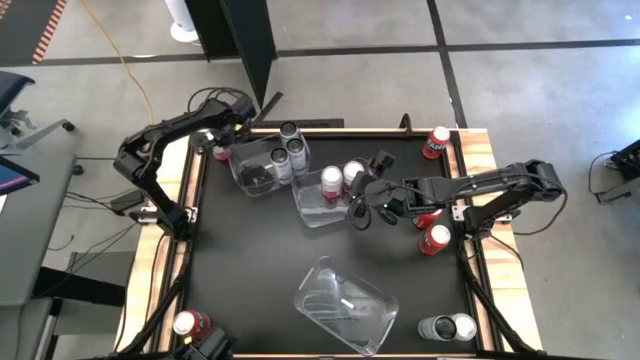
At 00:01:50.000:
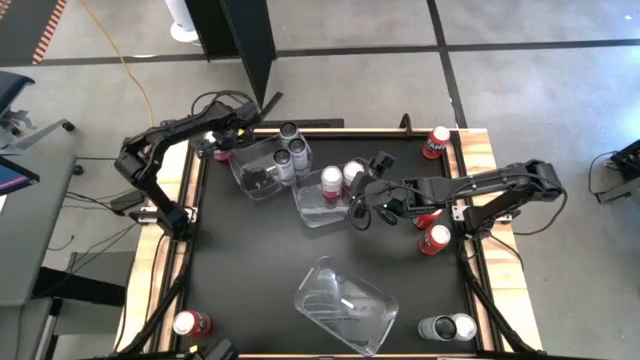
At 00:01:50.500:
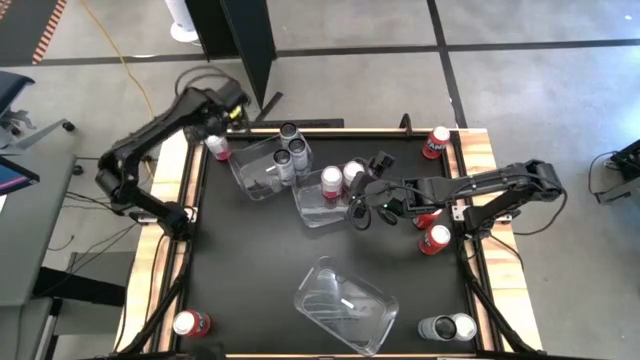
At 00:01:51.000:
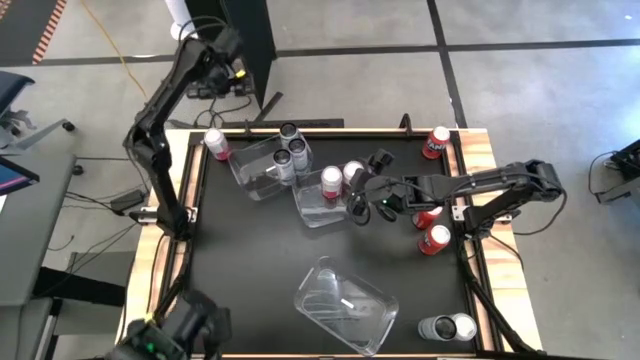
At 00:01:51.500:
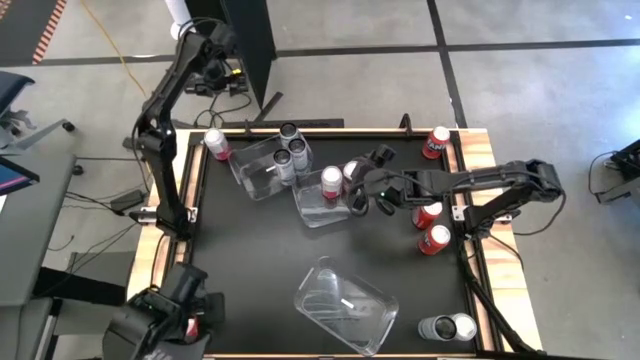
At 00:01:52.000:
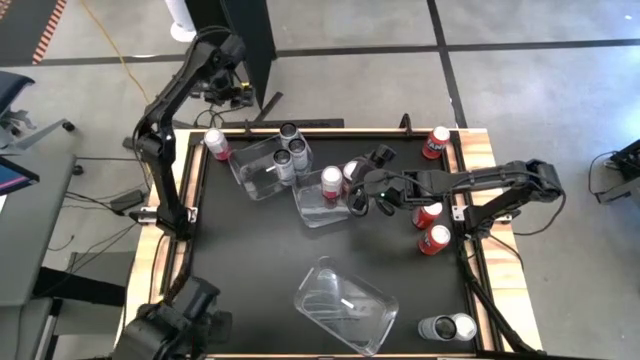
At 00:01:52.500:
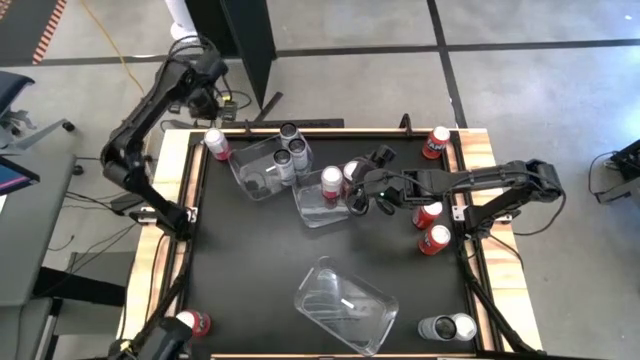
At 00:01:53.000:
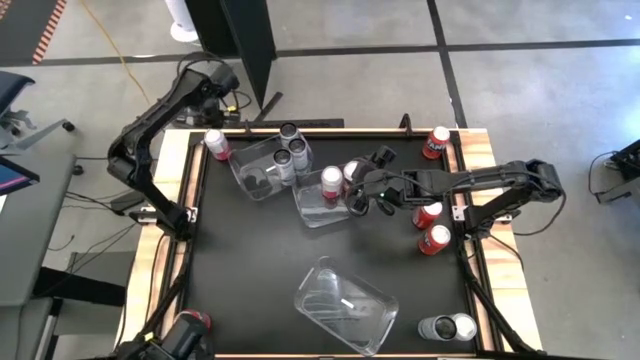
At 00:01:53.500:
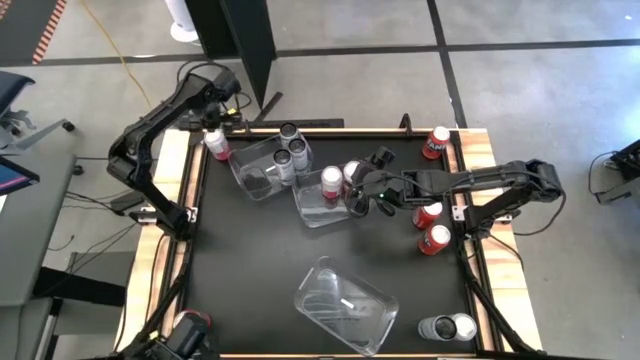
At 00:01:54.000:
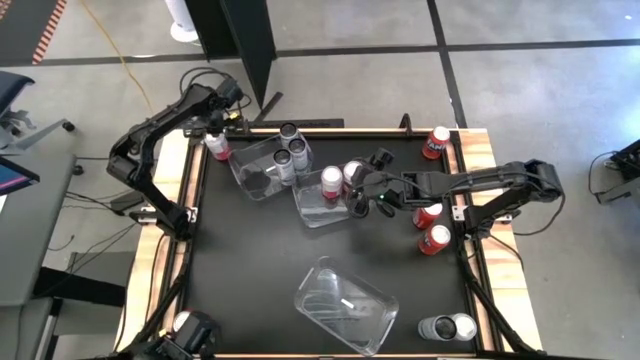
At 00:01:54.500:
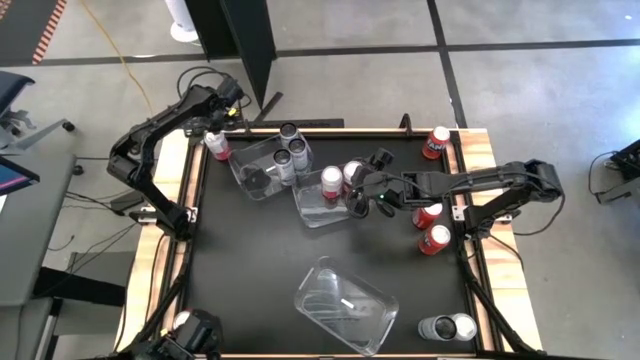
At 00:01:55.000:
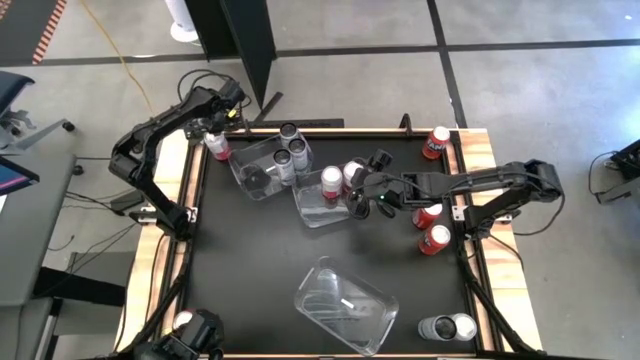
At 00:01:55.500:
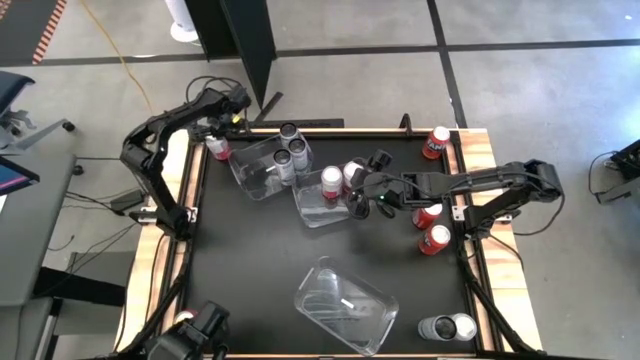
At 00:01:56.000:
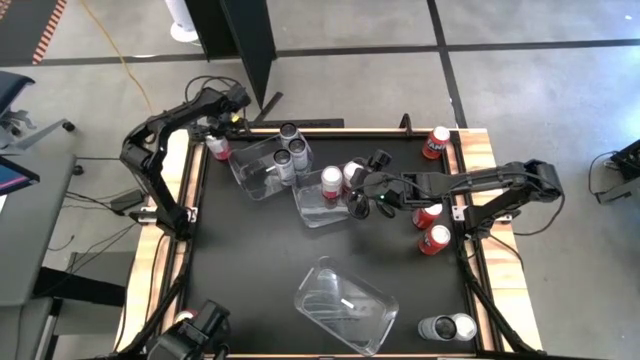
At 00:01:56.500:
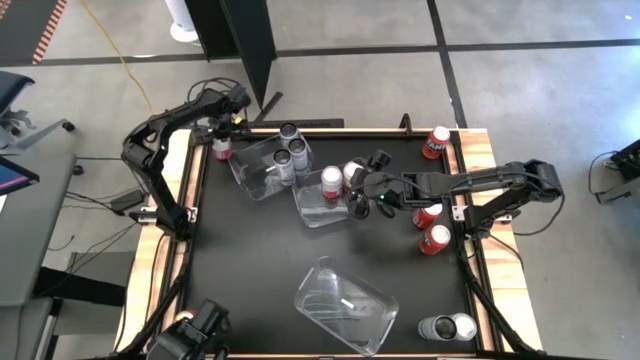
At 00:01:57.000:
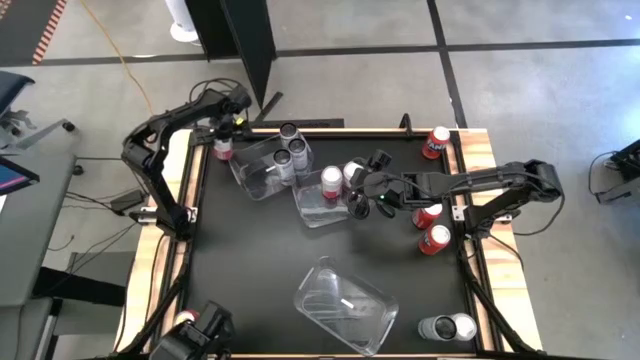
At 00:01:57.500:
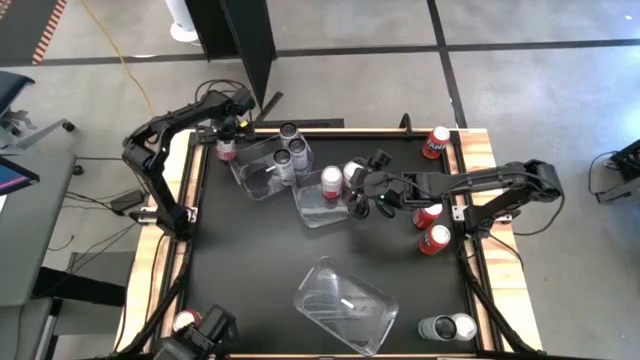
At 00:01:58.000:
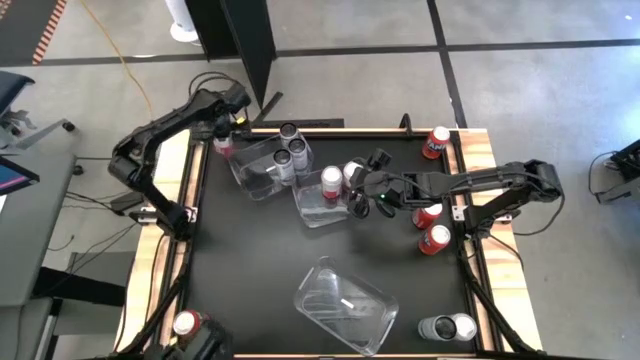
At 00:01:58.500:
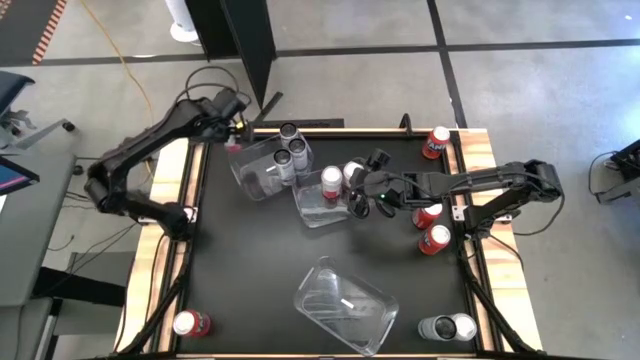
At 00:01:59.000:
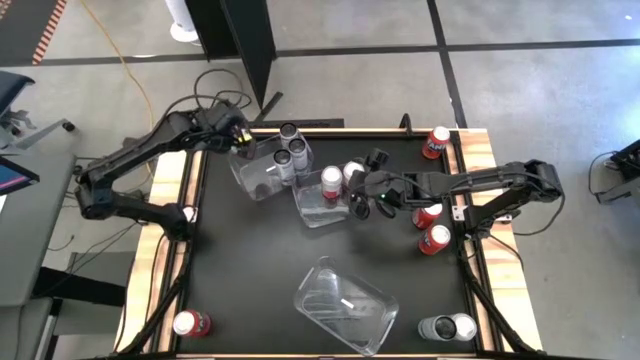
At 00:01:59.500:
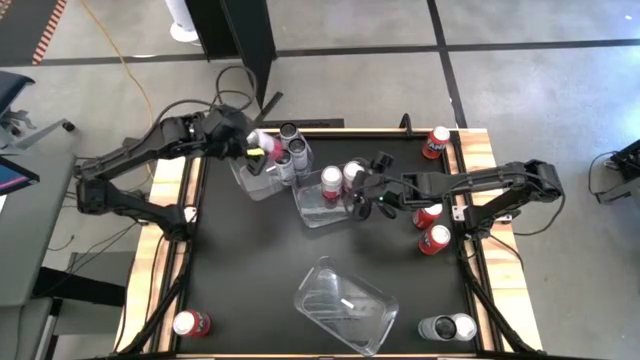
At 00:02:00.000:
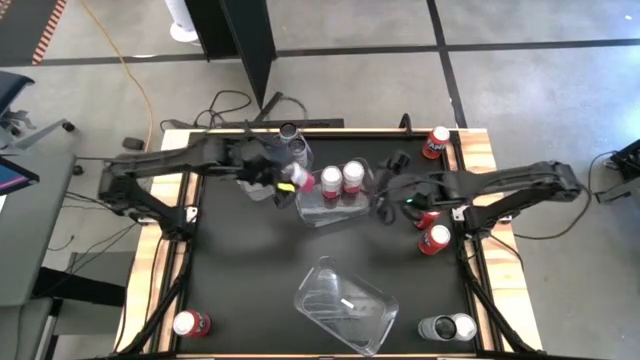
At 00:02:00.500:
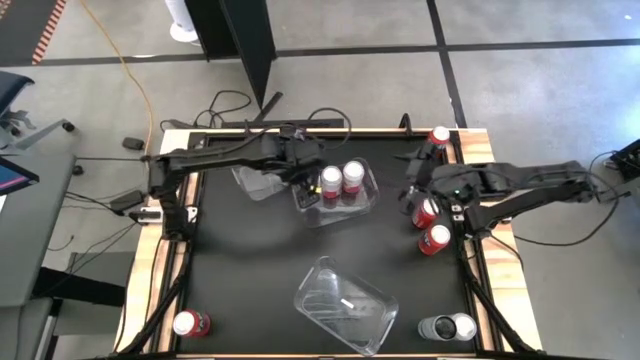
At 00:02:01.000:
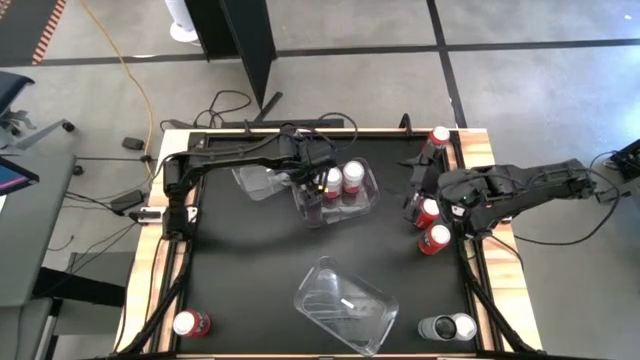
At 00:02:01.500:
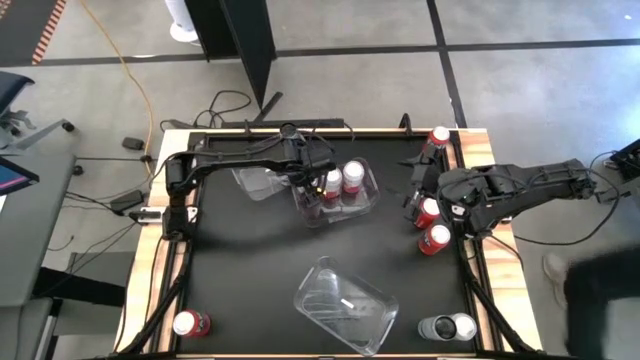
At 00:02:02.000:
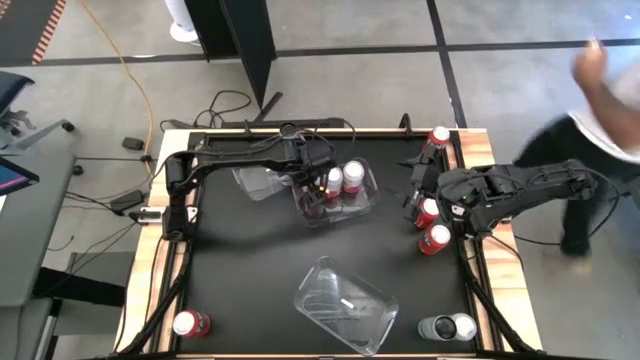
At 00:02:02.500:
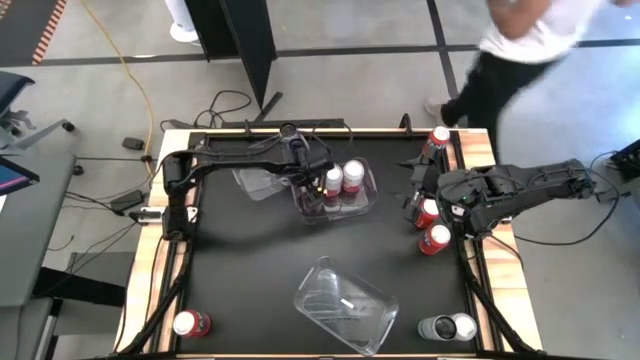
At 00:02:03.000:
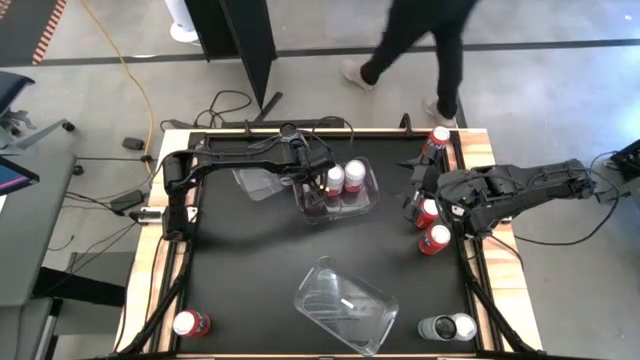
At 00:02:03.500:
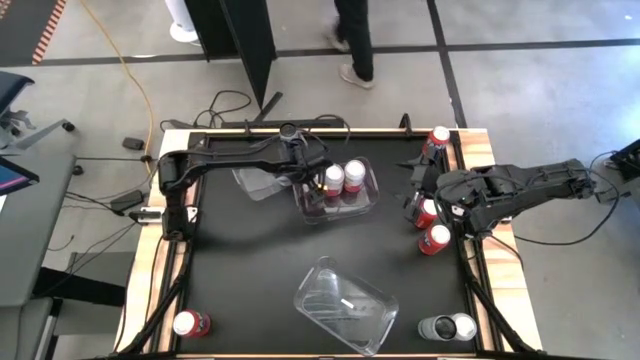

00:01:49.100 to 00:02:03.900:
Task: Sort soda cans
Put the top left pink-white soda can in the middle transparent bin
